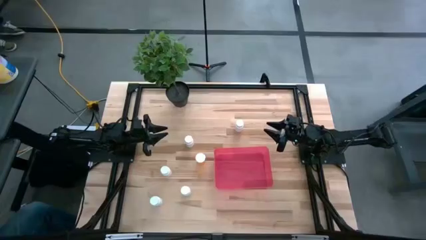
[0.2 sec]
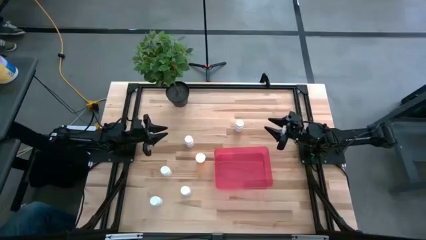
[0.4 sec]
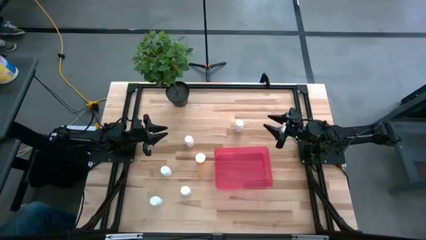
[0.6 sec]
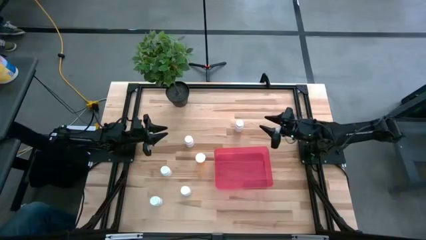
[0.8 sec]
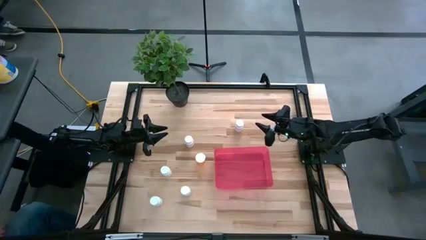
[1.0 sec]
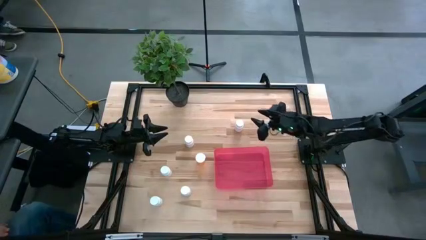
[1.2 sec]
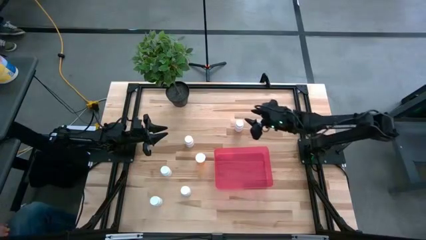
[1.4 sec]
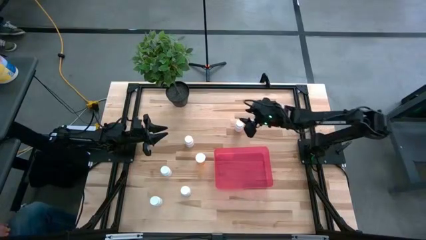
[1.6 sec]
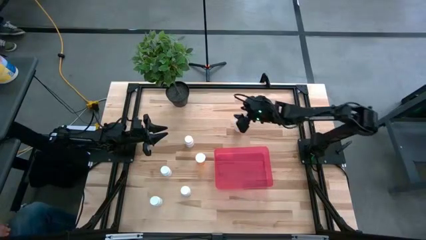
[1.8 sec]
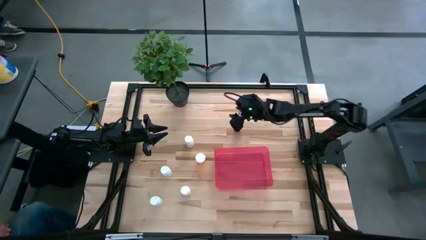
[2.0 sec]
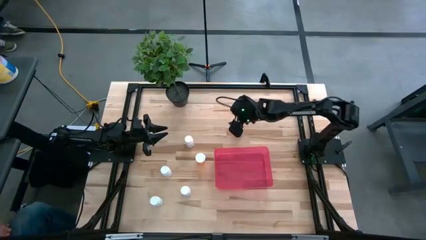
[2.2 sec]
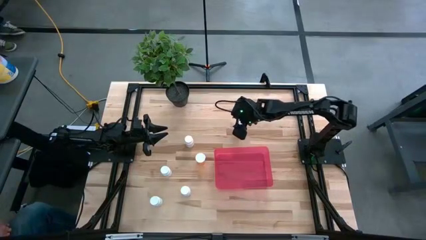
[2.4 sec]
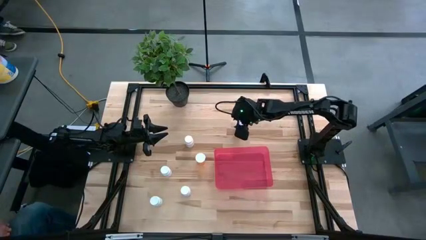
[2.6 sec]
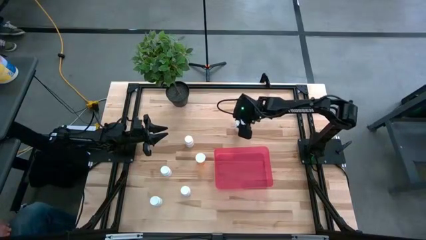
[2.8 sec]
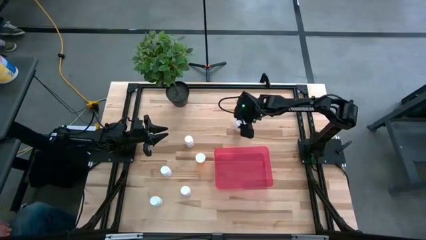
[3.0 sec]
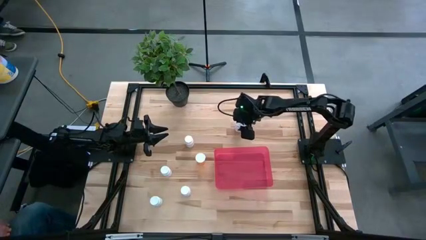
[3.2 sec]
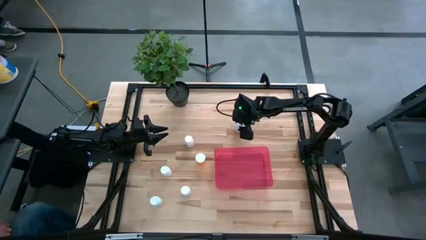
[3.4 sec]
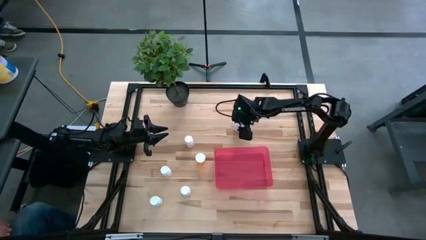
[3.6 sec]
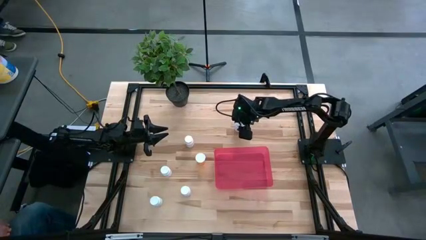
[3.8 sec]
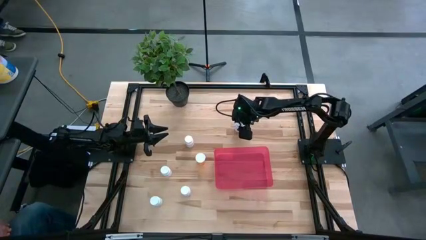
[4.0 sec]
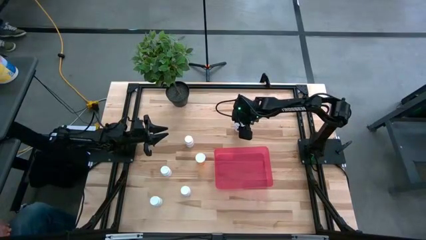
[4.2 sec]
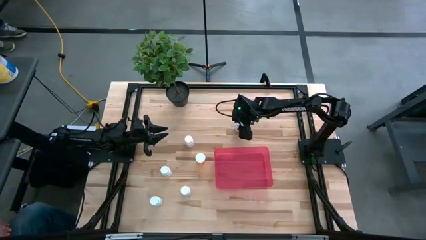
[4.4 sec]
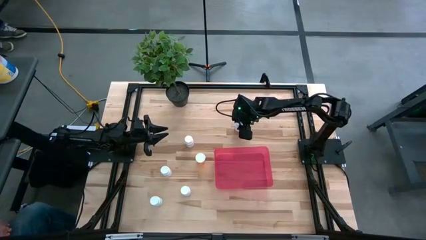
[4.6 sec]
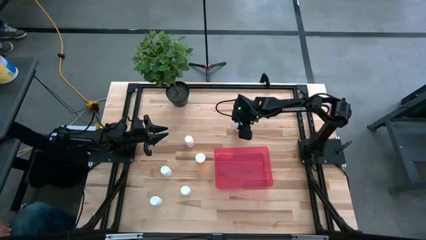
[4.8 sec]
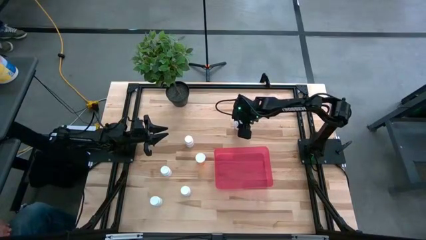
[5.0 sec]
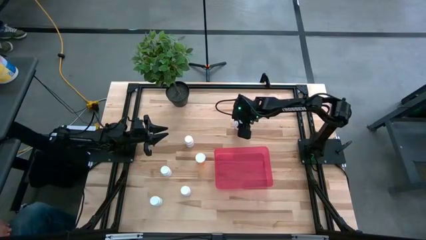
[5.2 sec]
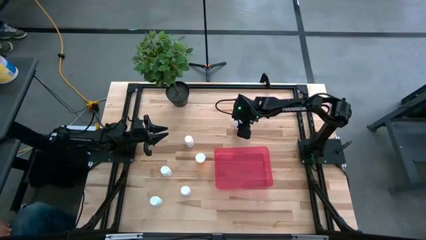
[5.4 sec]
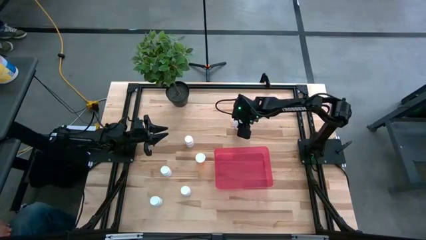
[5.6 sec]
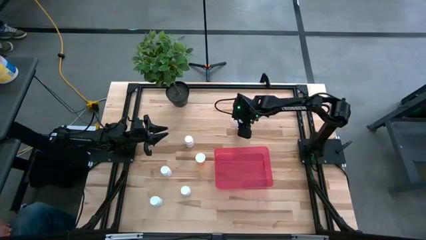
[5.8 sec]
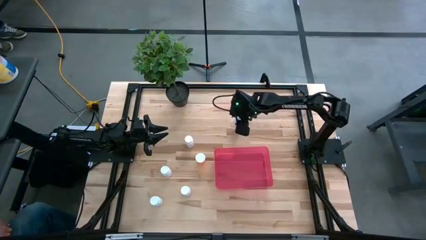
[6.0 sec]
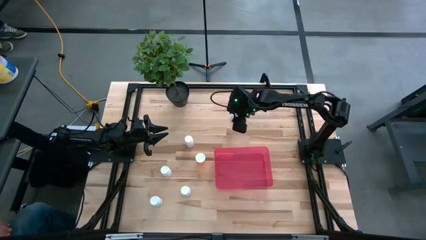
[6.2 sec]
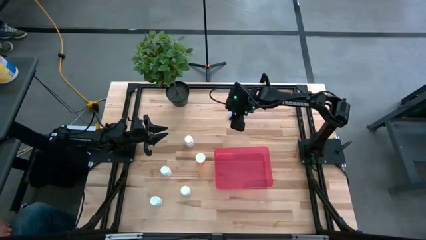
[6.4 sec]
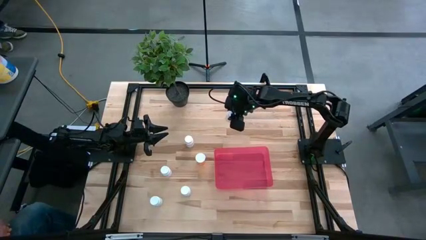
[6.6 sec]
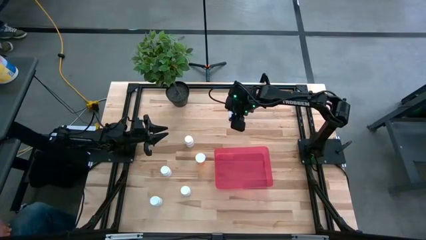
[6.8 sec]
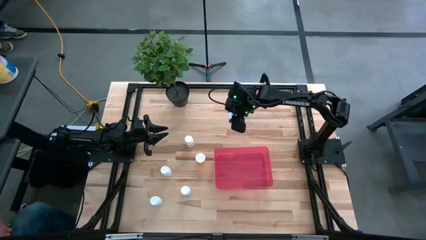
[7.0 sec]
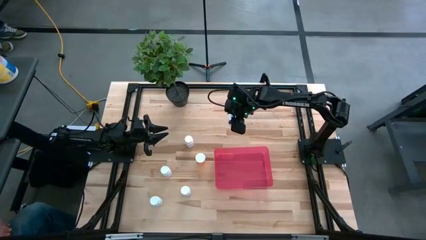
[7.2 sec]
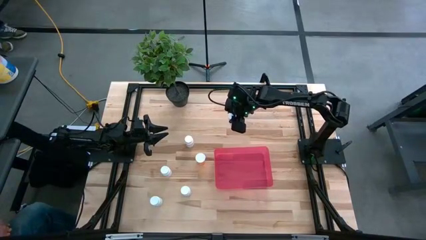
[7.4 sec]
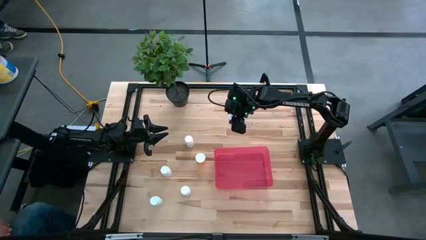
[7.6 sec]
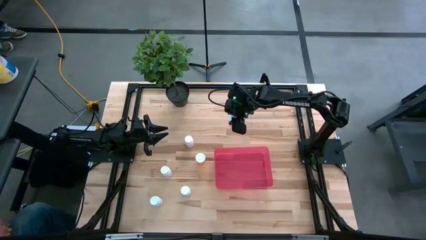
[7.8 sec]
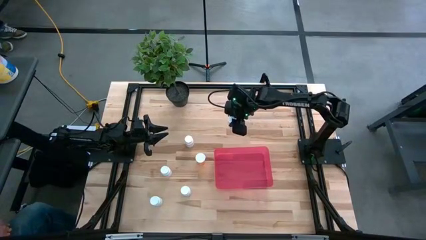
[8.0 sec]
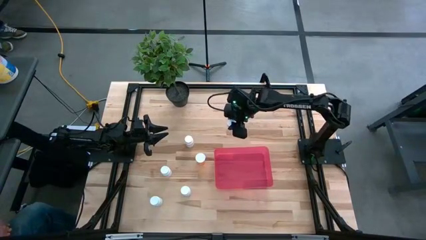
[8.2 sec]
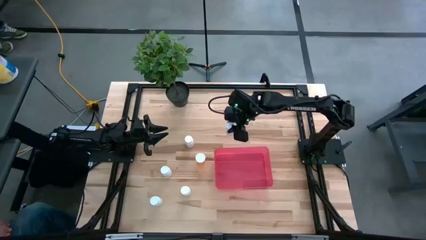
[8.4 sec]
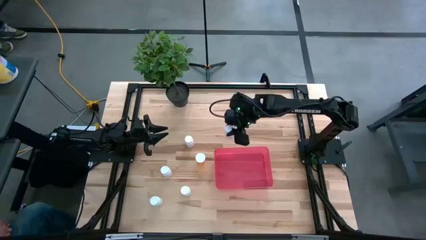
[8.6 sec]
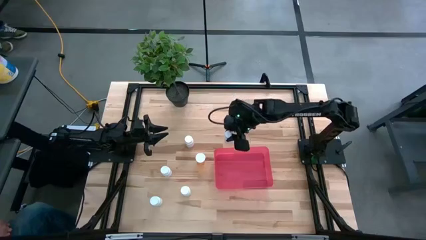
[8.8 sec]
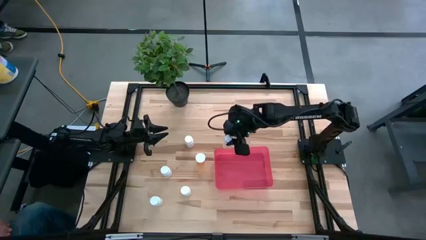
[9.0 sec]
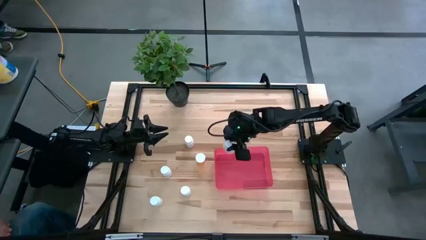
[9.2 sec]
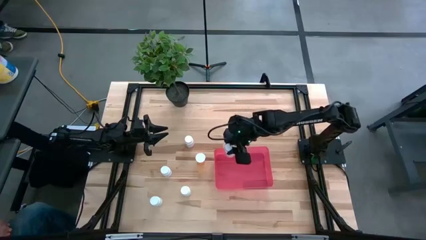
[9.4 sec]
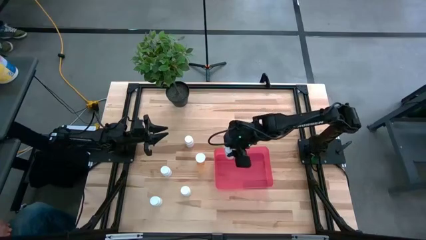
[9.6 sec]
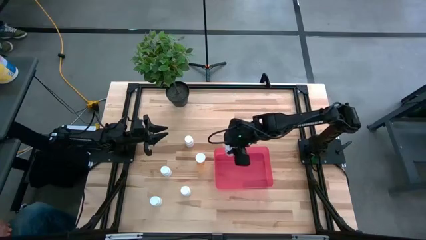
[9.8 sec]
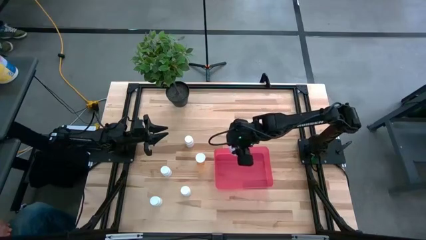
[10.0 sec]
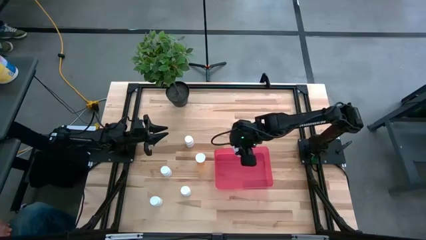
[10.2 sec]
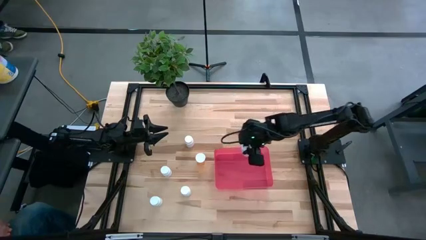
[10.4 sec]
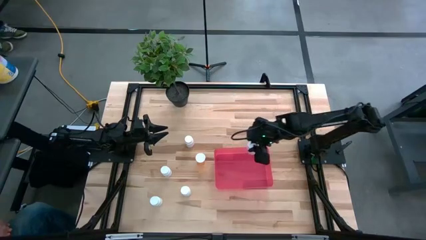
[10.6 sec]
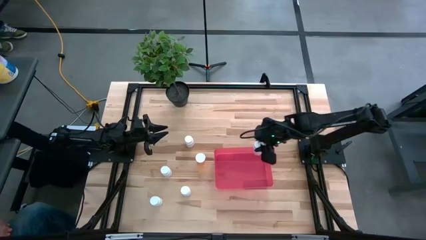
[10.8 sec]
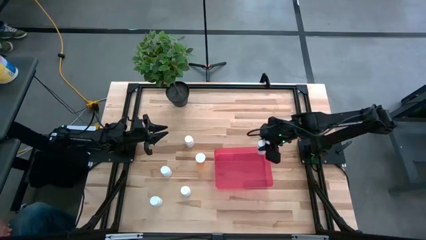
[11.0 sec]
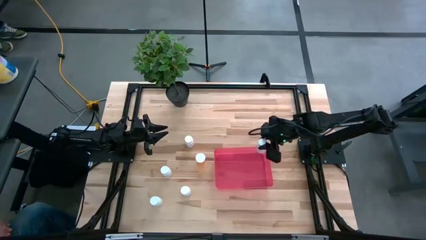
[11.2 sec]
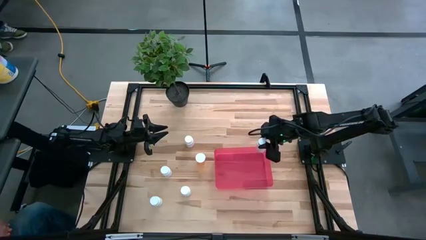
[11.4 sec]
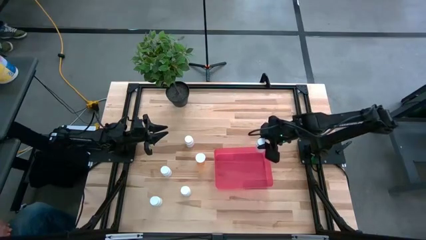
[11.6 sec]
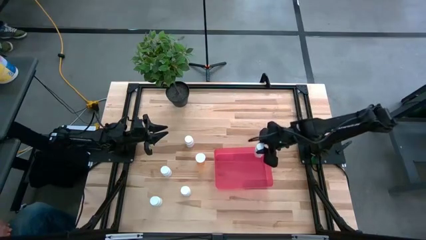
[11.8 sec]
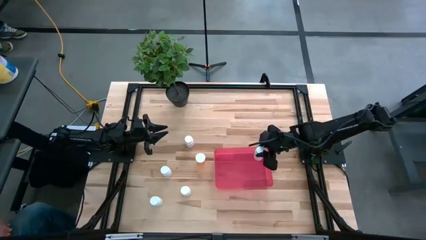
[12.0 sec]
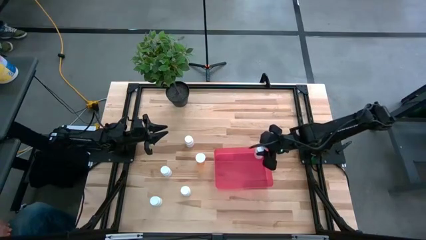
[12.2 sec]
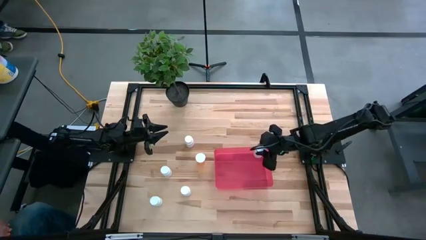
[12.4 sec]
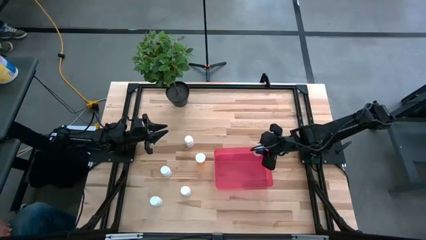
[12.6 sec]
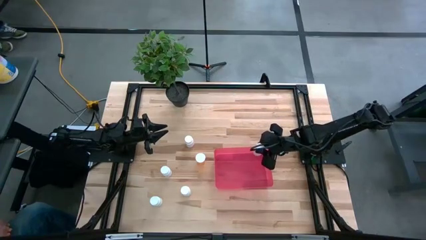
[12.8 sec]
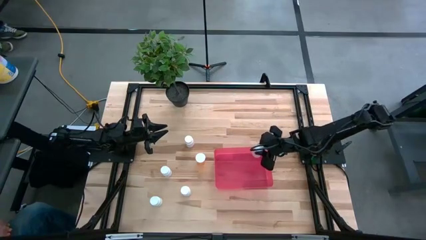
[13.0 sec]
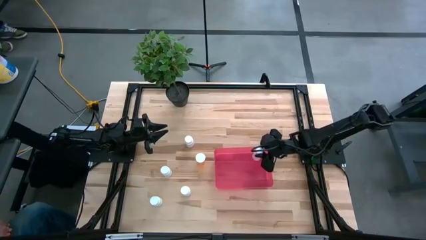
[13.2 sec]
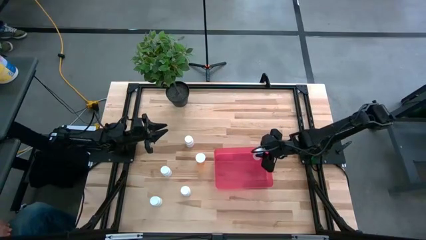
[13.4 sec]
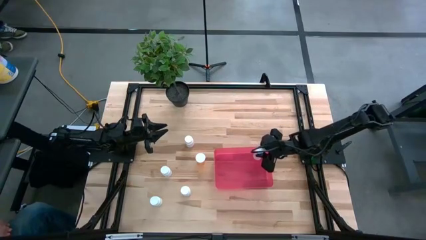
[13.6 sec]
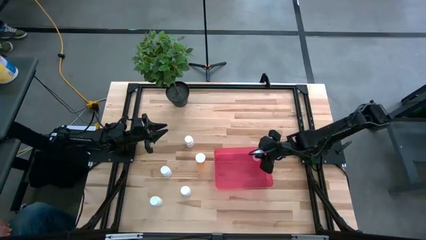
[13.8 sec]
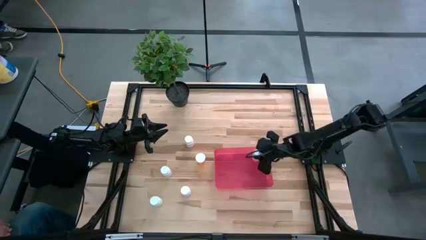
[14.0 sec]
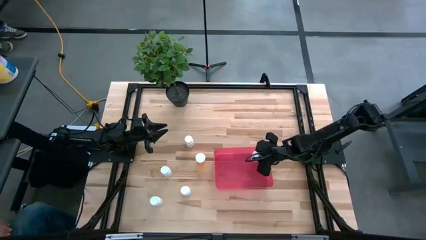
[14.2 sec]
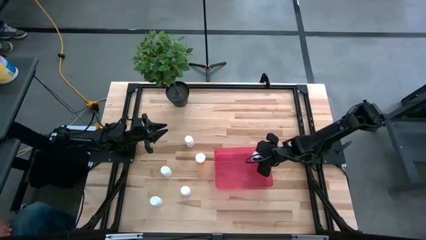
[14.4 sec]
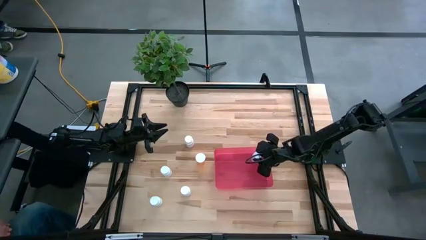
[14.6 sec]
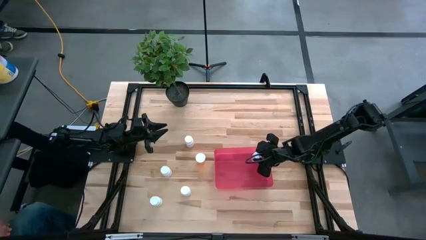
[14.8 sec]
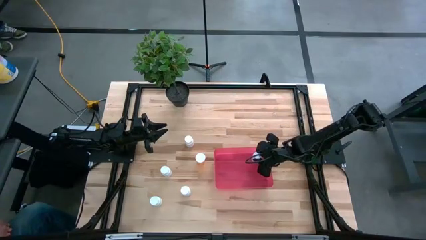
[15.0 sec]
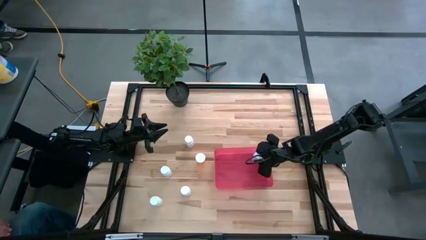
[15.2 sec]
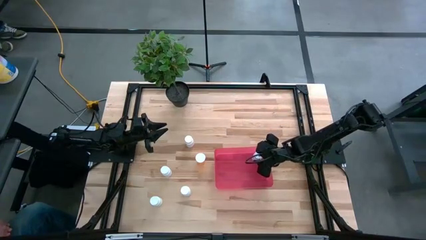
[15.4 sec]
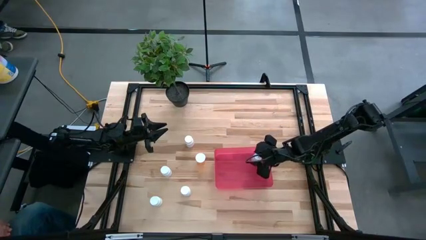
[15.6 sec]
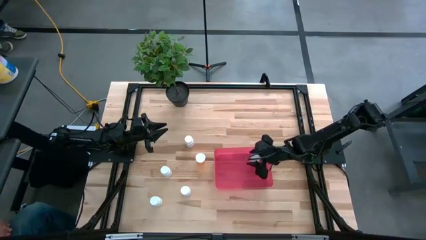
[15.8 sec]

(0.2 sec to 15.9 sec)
Task: Pick and place pill bottles into a basket
Put the white pill bottle into the pink bin
